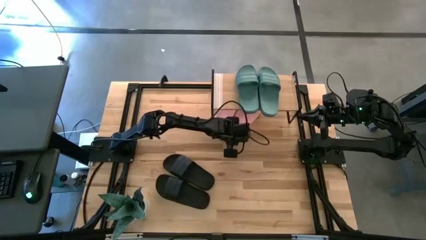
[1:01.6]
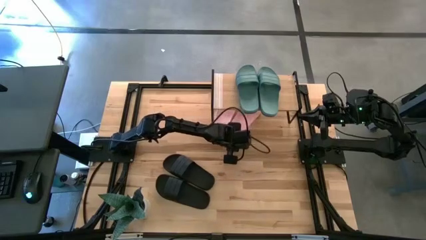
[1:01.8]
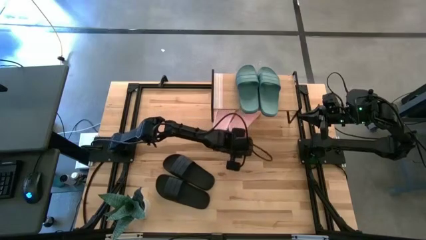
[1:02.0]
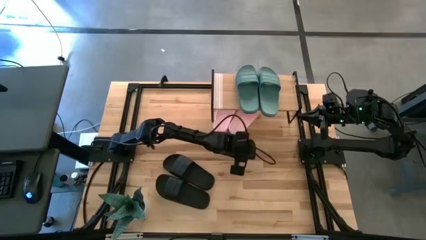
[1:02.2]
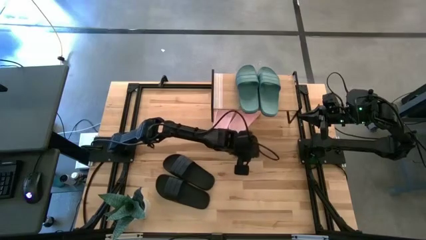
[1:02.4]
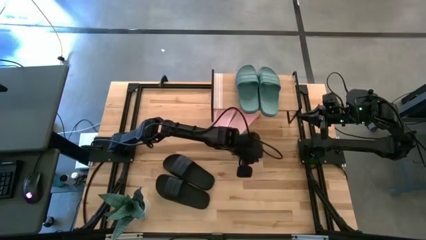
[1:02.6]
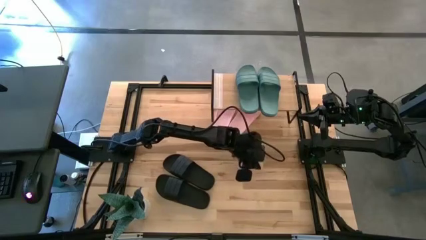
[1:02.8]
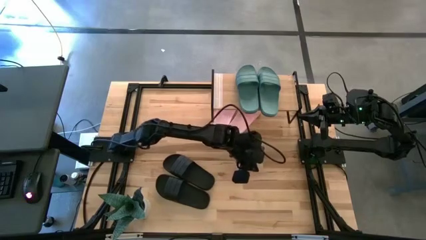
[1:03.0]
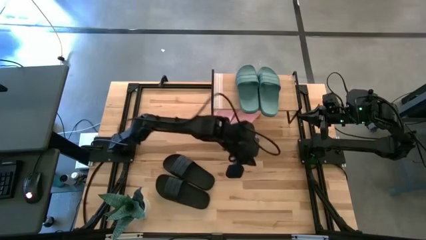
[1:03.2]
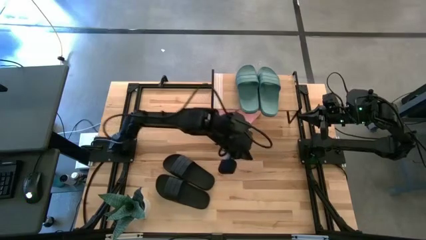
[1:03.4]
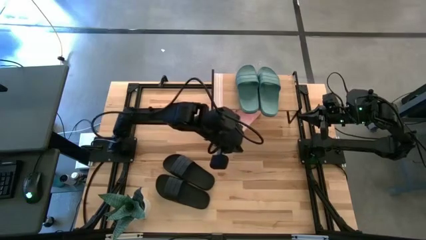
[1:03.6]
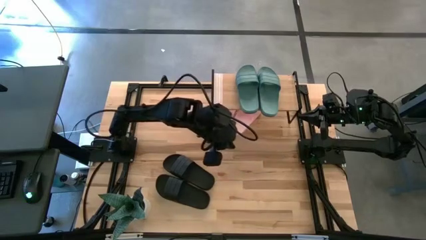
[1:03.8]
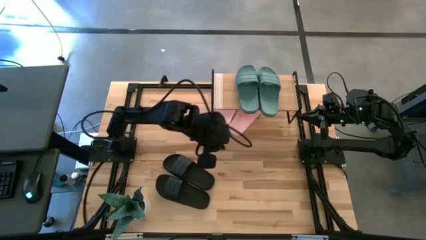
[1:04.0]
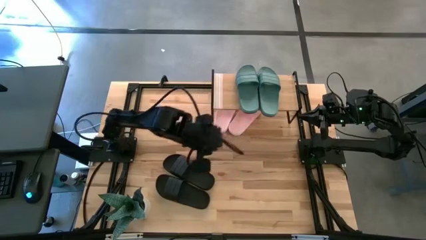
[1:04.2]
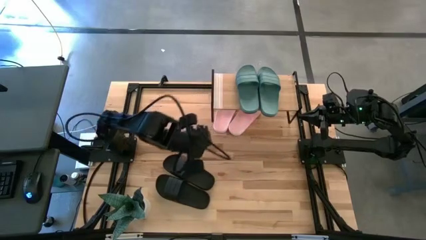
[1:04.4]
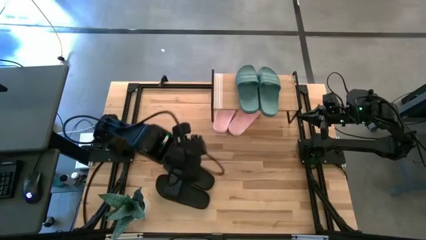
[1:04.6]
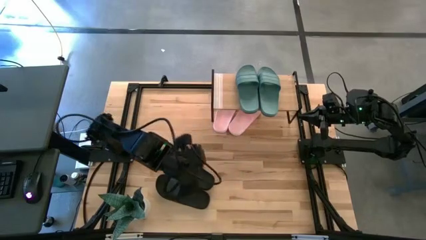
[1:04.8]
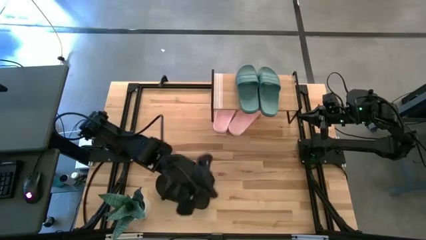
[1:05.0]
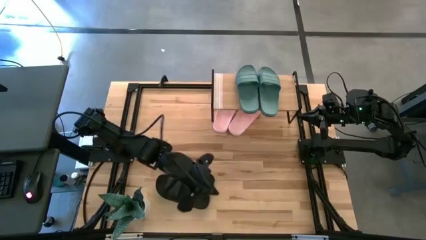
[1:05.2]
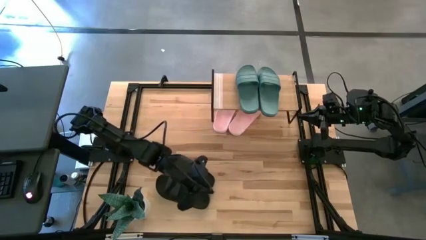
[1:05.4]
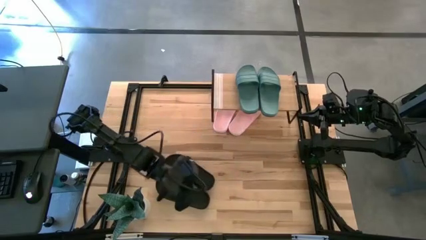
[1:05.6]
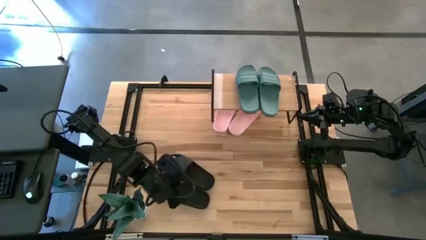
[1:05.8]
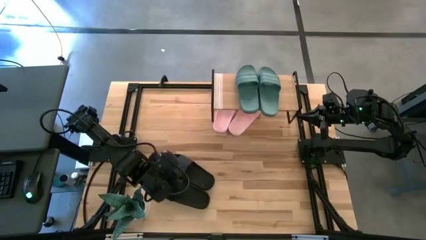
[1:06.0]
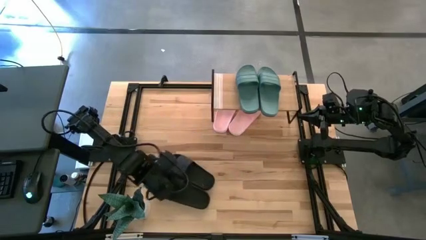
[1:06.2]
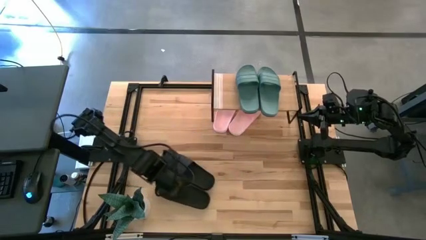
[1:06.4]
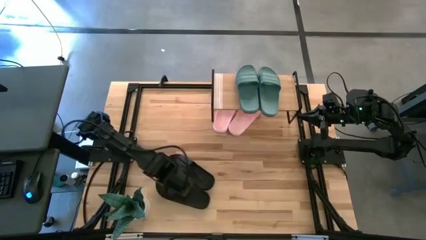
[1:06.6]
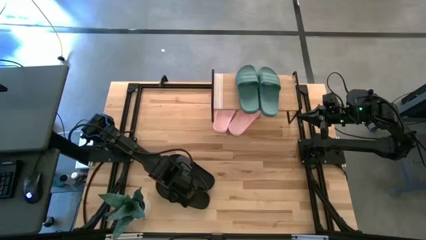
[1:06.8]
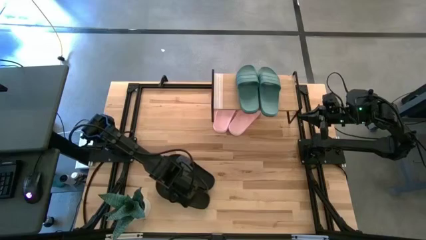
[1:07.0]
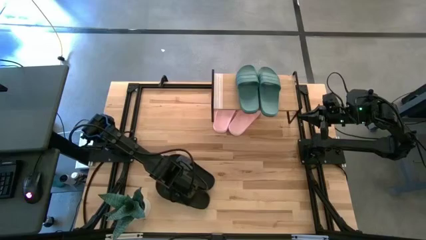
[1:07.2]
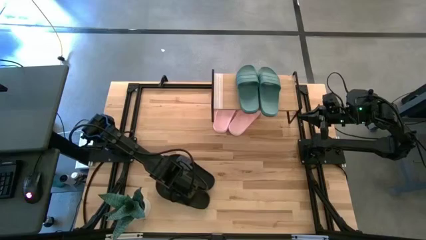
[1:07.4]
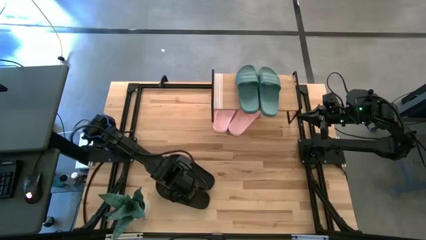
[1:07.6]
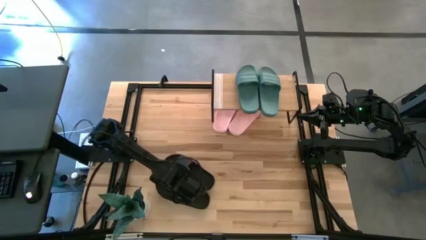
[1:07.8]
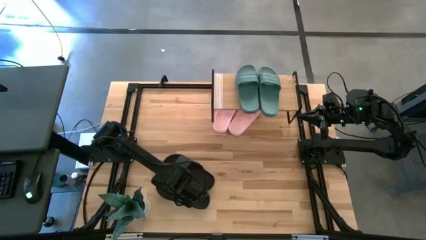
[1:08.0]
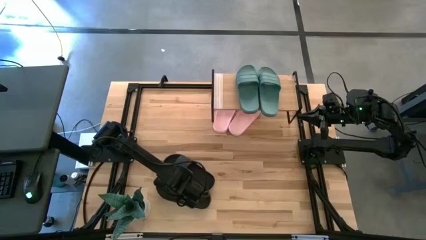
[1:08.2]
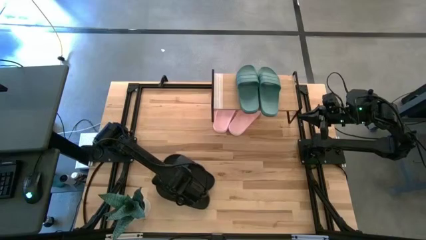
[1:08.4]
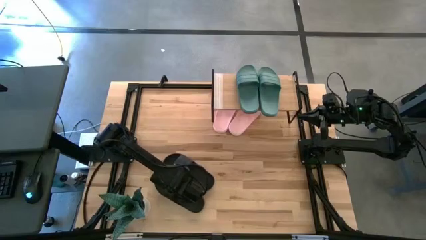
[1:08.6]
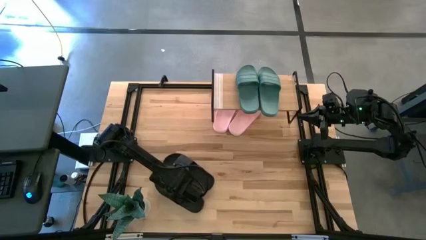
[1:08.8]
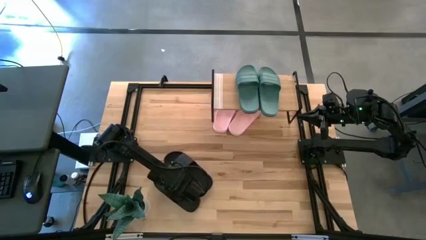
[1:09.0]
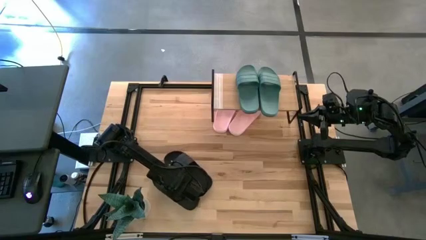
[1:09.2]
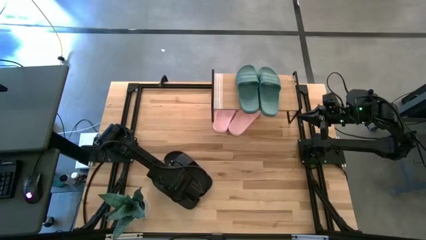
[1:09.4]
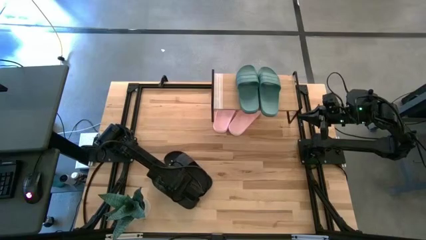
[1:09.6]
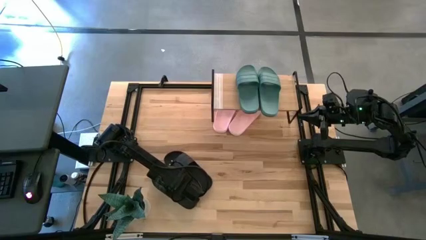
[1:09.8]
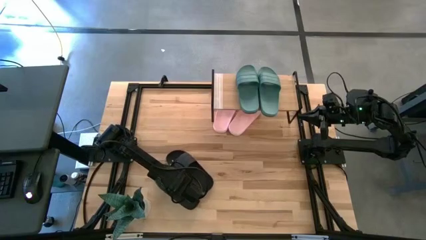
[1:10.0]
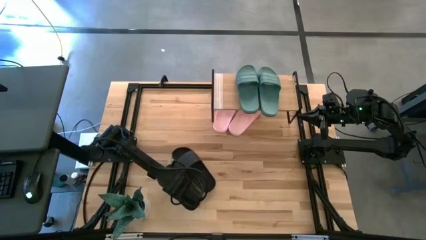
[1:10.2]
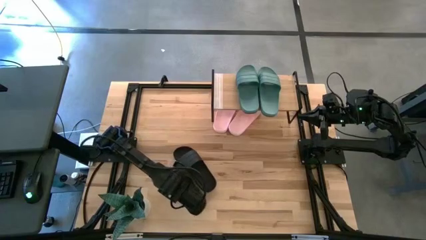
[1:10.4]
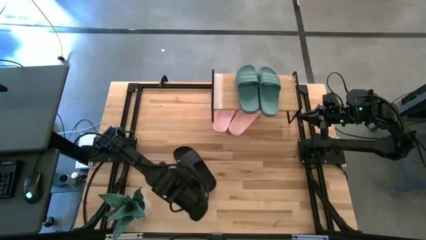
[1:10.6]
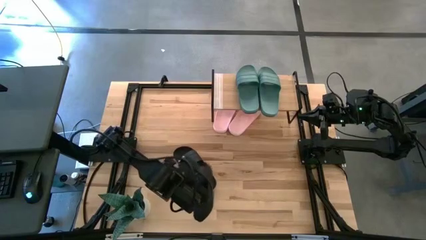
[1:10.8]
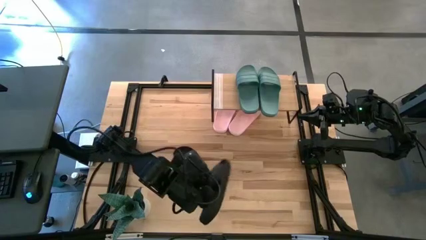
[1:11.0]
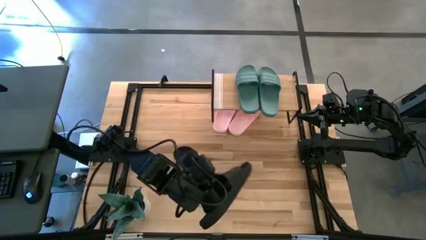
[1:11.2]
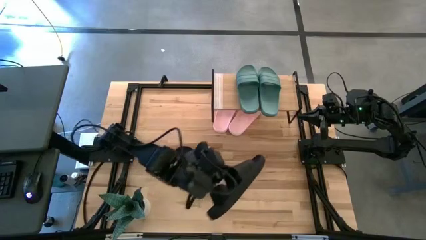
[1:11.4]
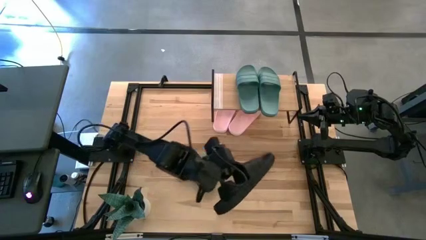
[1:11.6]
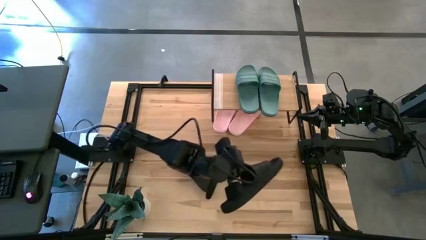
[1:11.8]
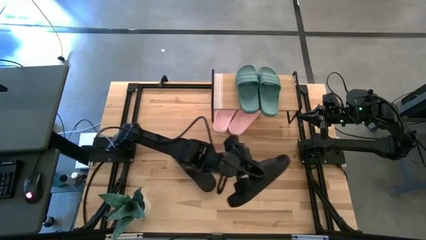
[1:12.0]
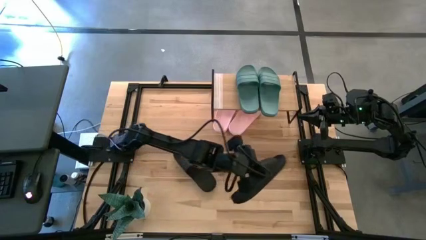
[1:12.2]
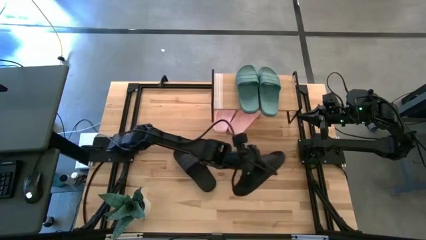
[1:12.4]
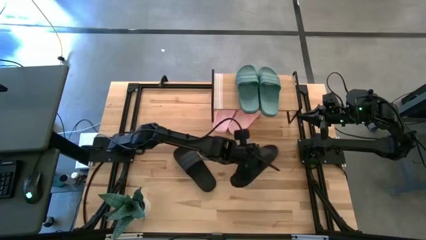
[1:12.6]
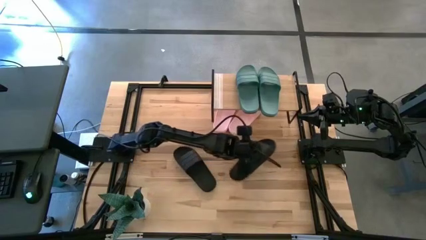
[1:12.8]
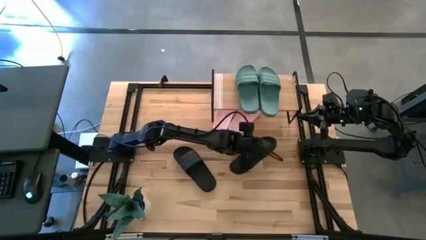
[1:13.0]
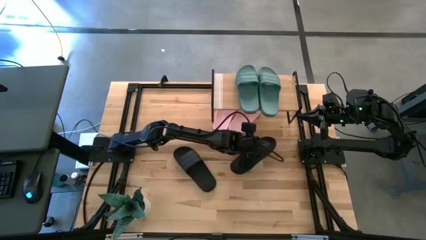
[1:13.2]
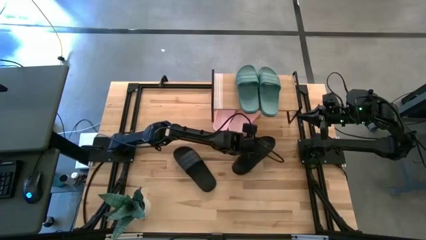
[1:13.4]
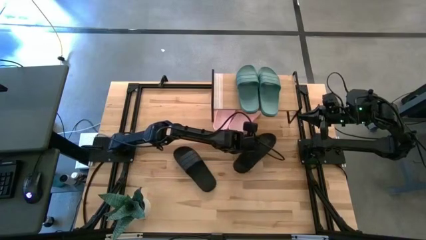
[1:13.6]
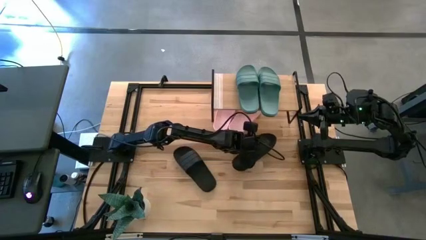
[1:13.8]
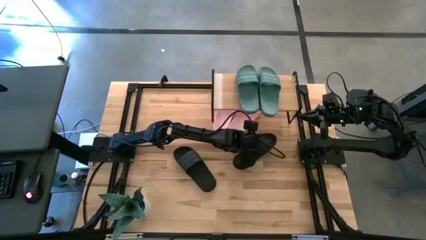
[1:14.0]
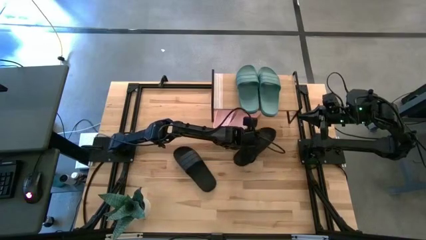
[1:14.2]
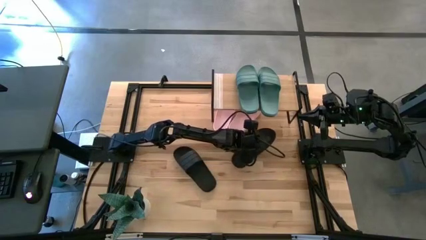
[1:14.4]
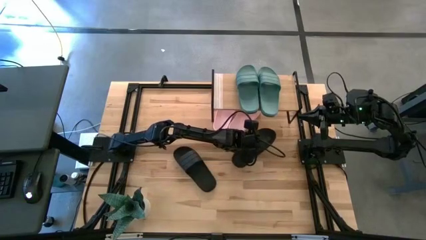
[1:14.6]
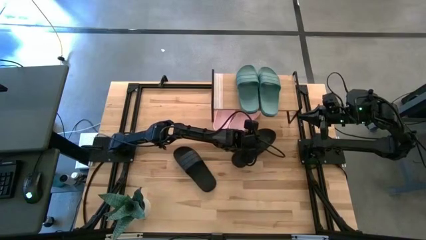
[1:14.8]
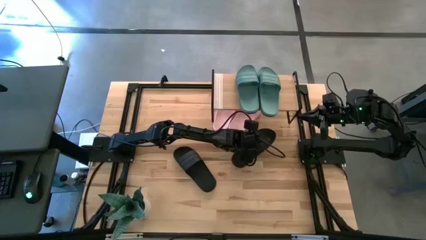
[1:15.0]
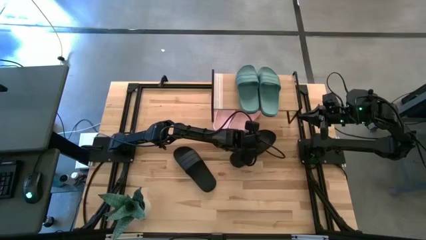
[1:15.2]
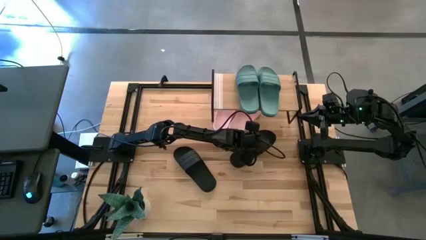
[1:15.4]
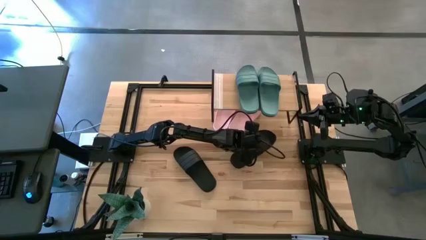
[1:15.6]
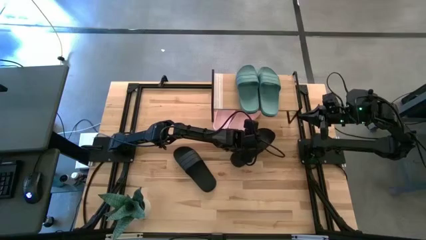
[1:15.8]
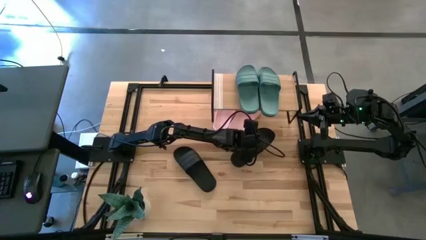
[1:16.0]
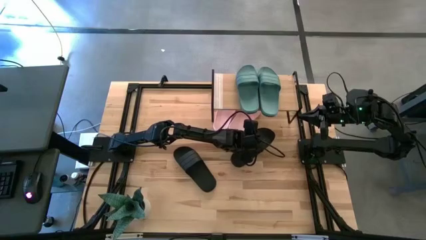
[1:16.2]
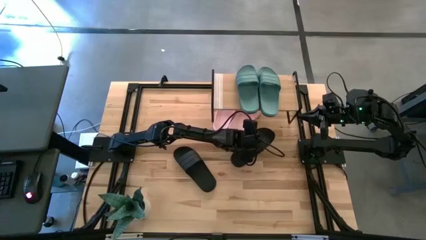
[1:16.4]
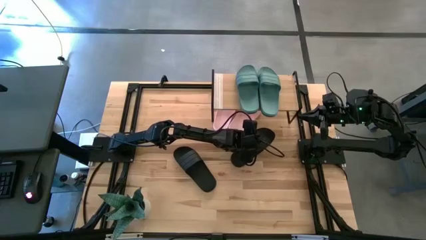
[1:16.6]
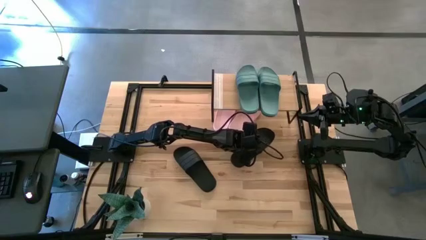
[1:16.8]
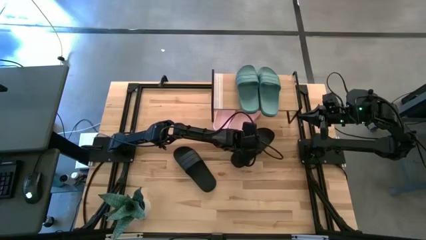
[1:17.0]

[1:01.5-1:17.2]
Task: Pick and place slides into the shelf
Move the bottom black slide to the top right of the table
